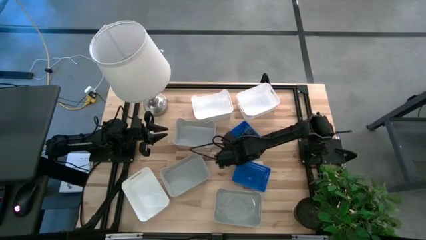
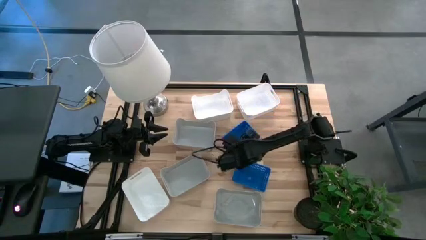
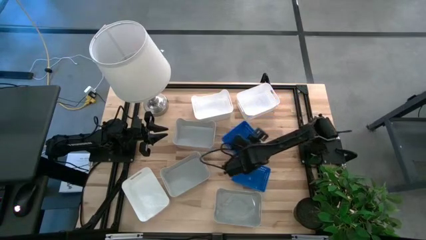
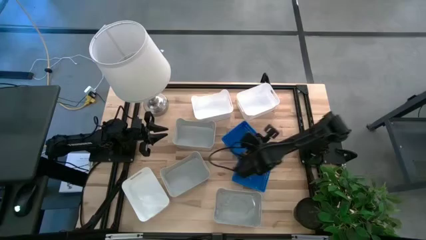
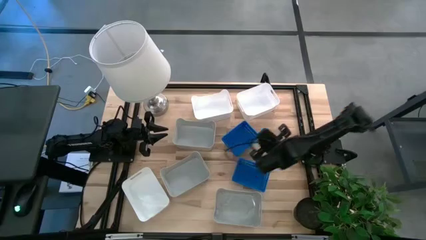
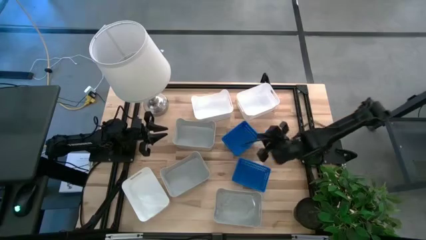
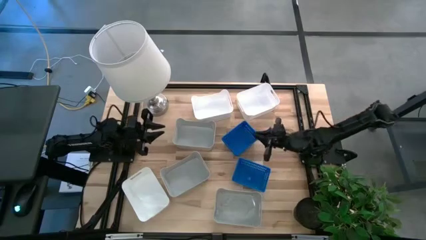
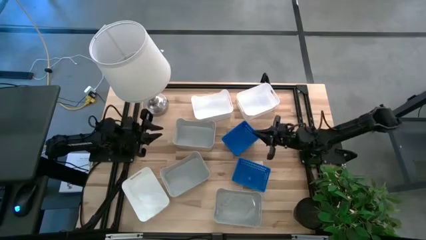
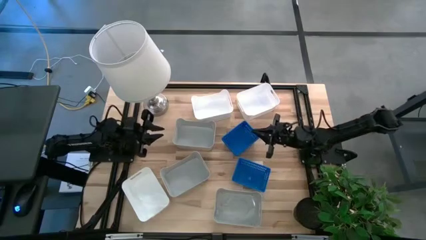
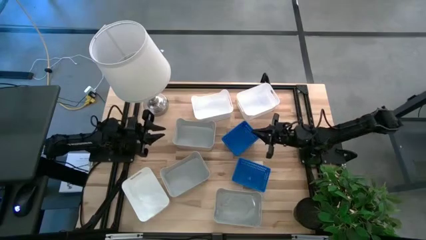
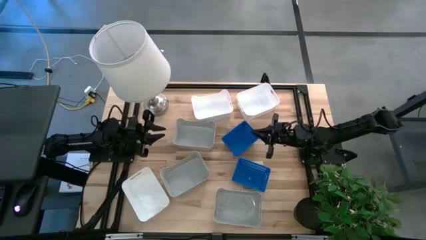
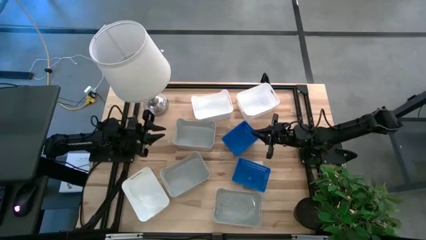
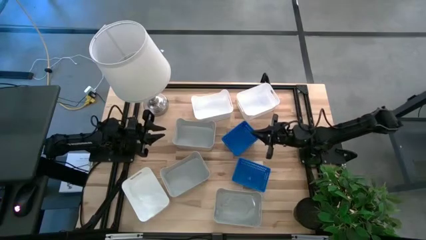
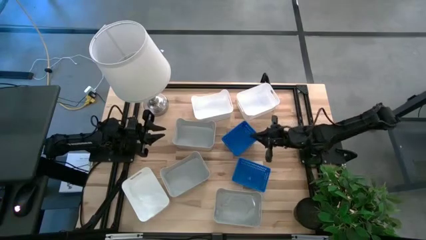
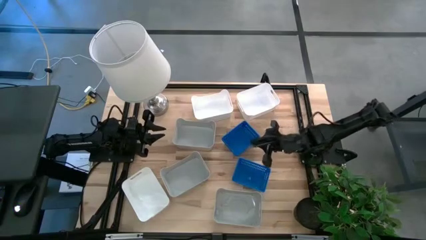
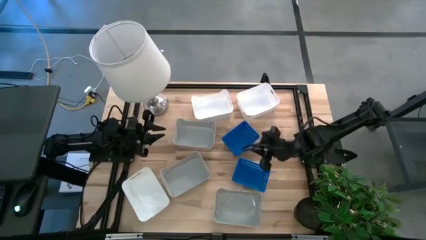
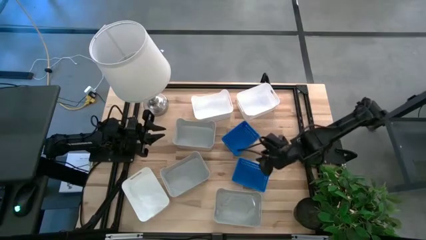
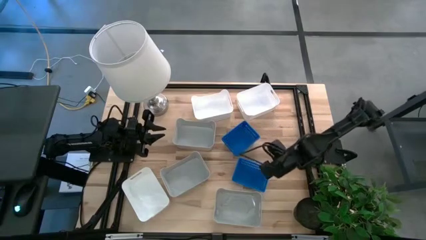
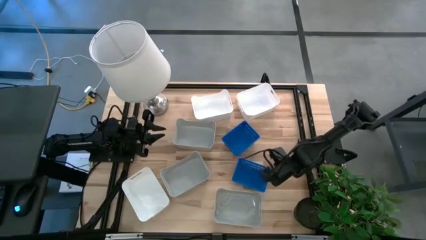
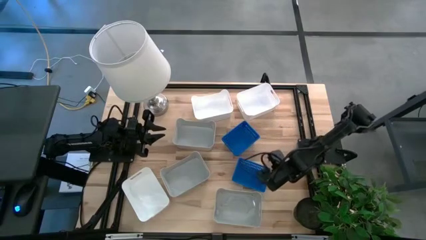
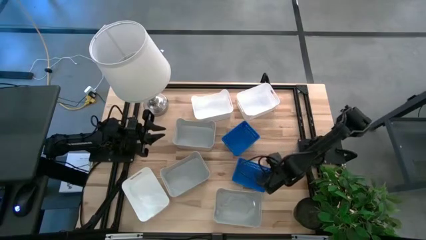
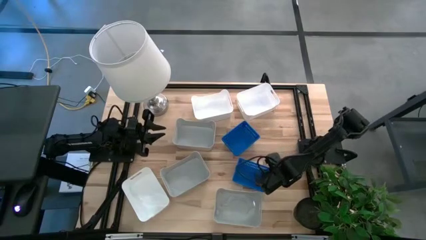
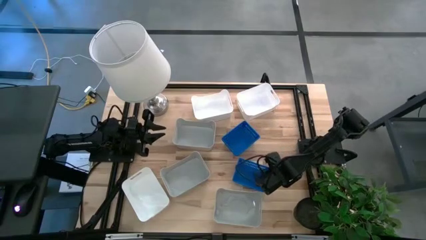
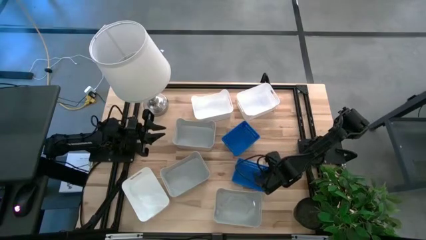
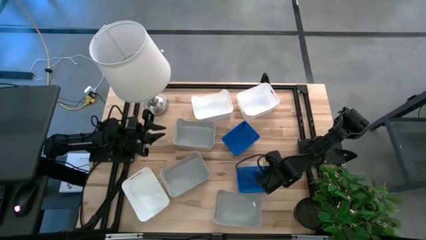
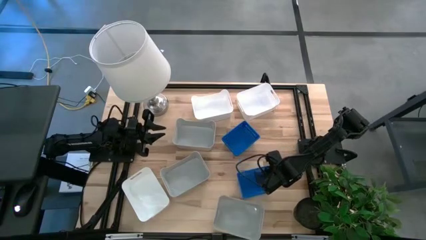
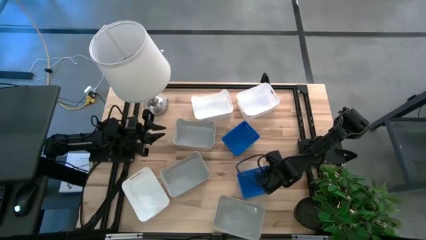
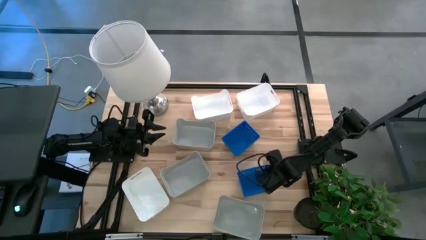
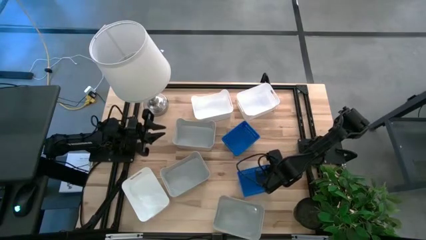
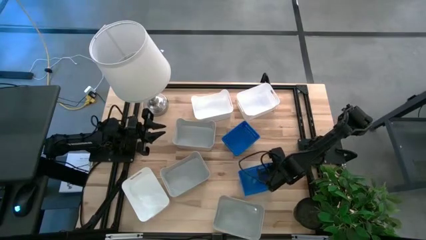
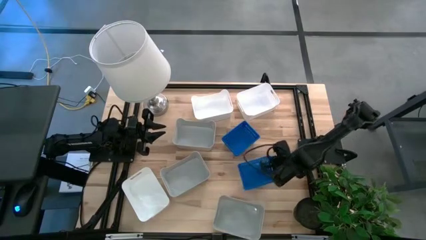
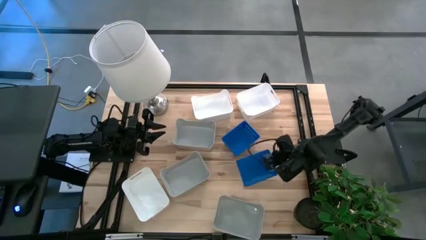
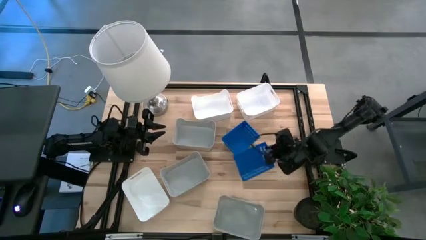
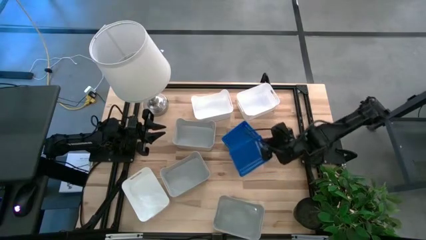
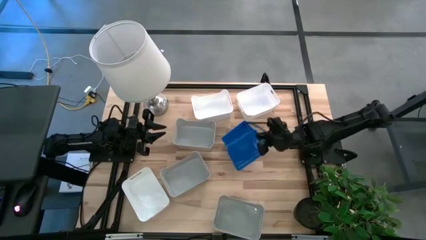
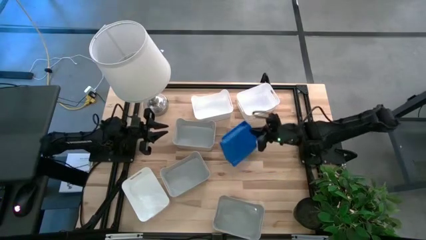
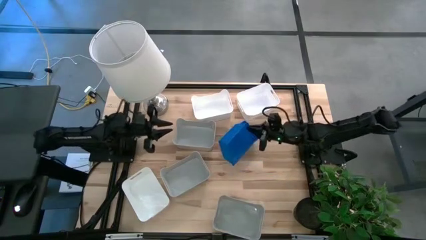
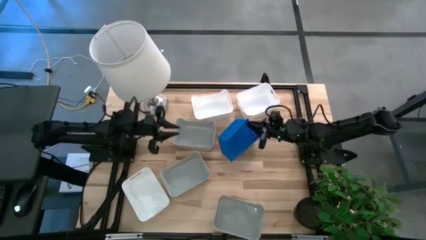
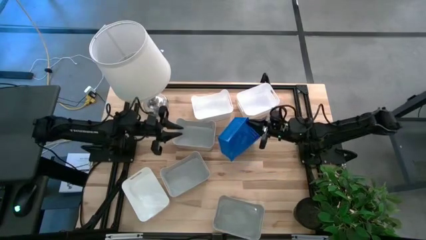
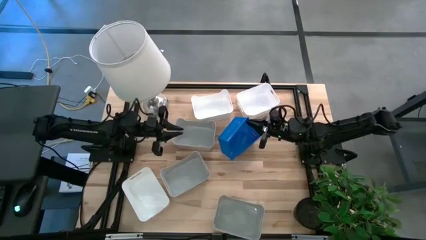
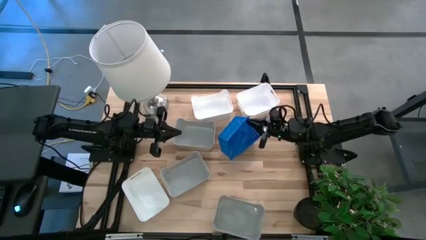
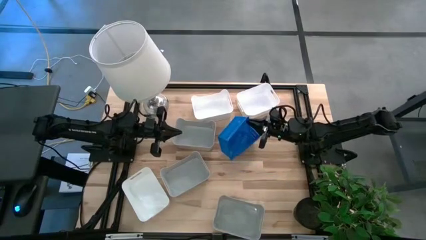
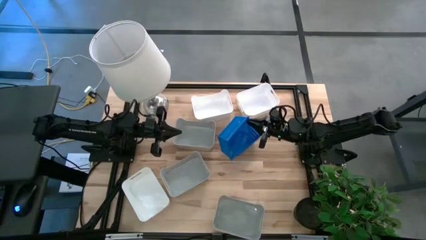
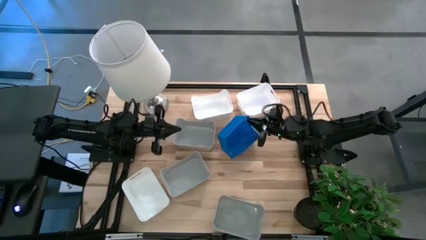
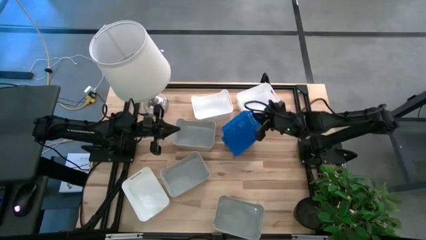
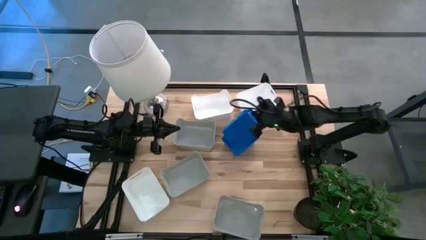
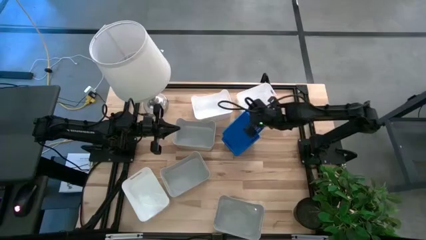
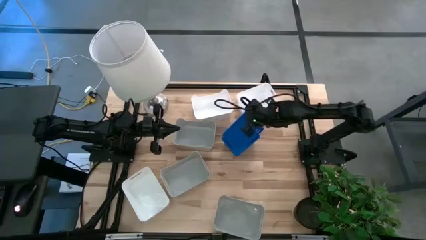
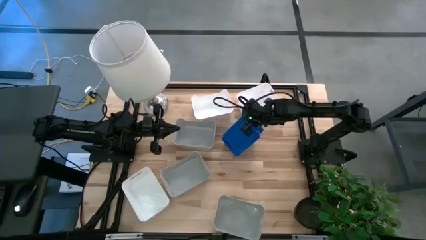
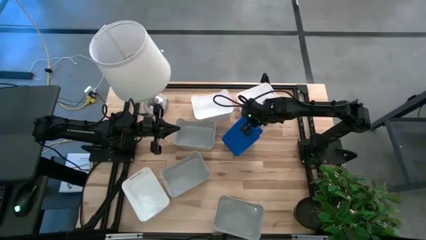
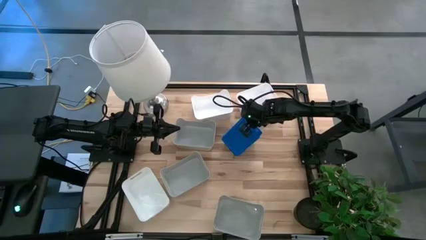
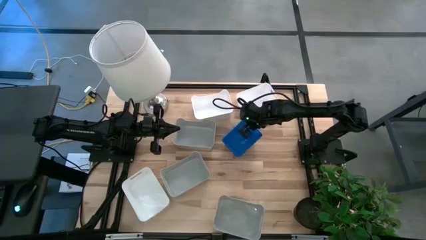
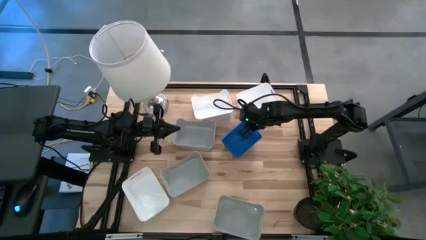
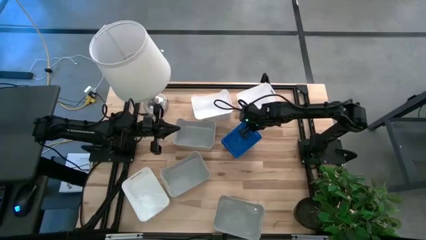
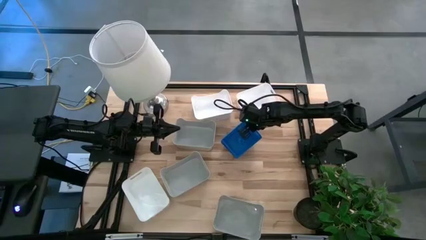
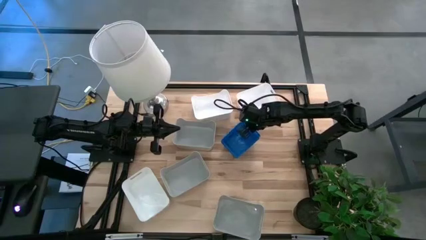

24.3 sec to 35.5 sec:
Stack the bin on top of the top blue bin
